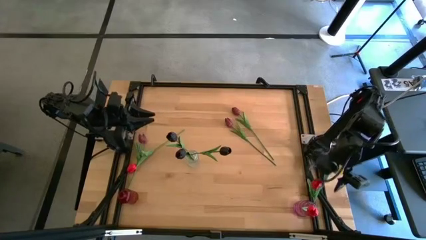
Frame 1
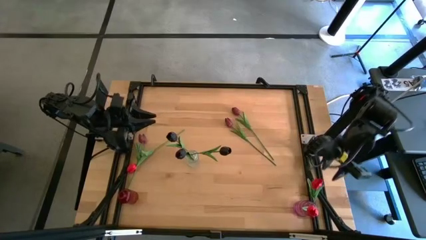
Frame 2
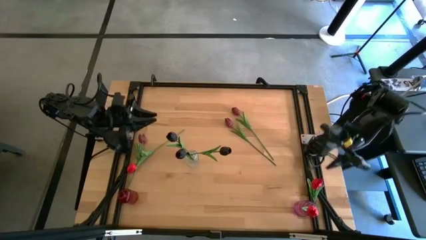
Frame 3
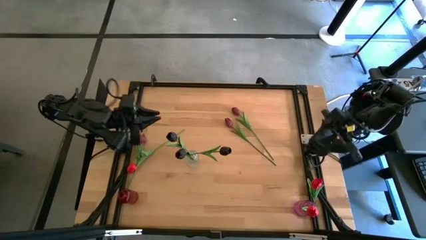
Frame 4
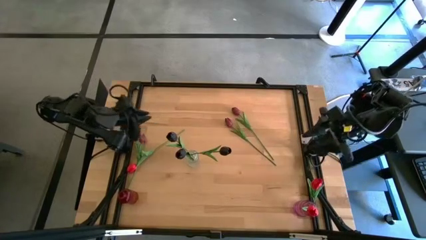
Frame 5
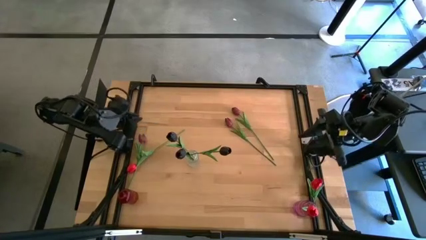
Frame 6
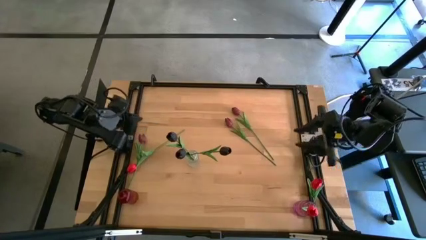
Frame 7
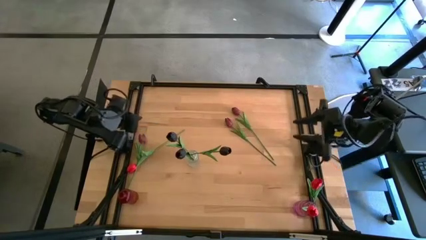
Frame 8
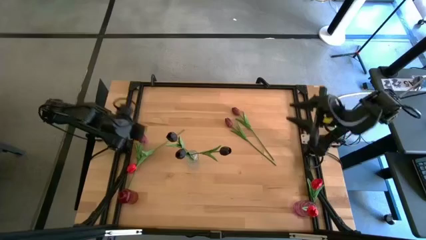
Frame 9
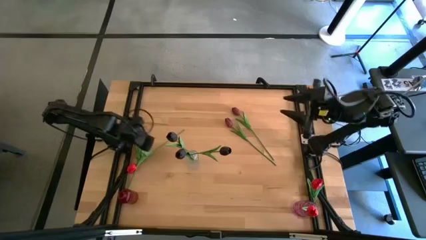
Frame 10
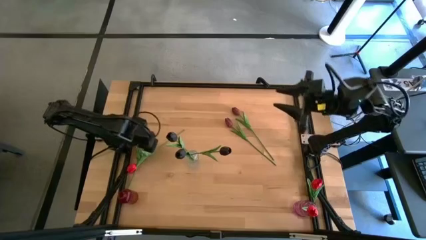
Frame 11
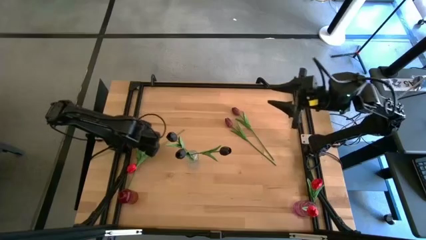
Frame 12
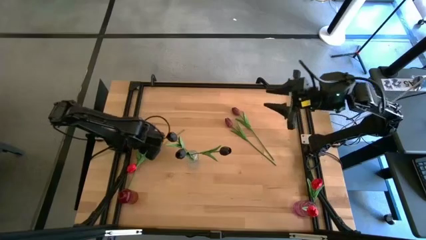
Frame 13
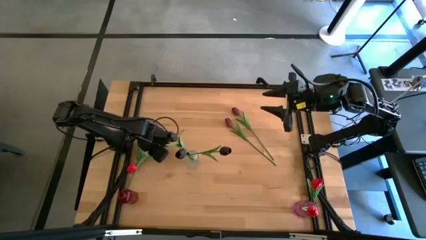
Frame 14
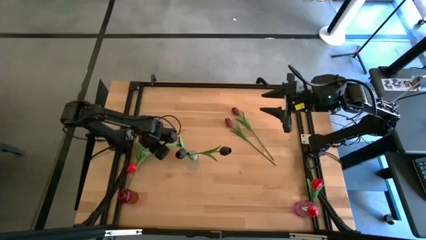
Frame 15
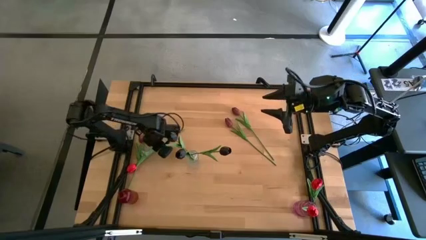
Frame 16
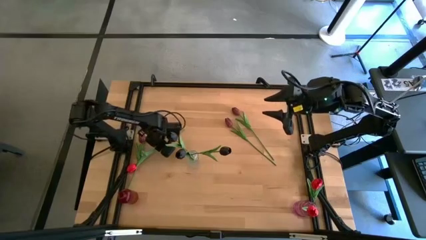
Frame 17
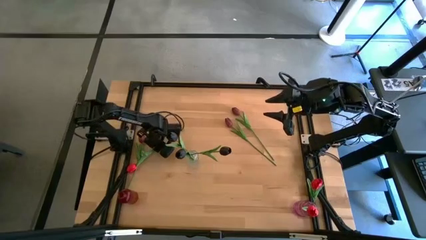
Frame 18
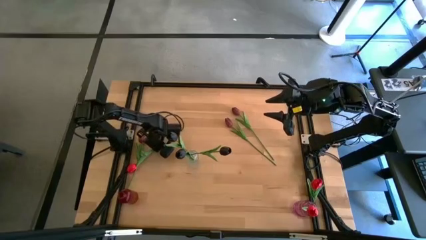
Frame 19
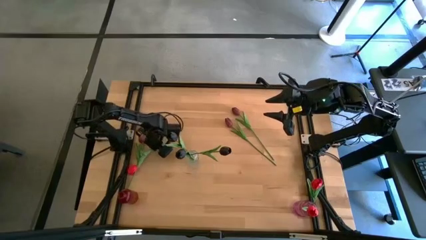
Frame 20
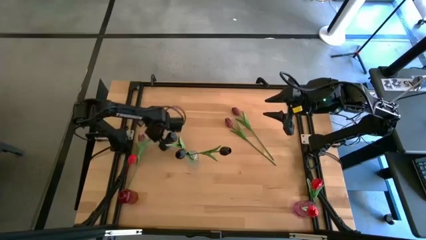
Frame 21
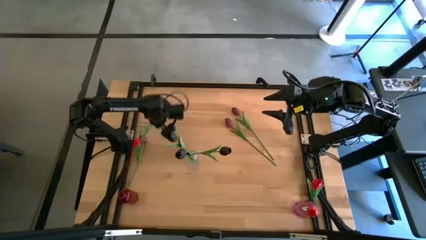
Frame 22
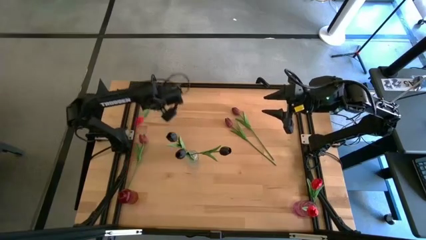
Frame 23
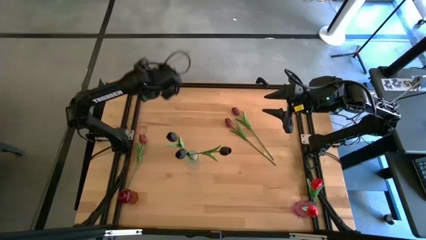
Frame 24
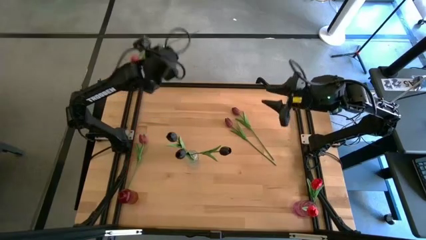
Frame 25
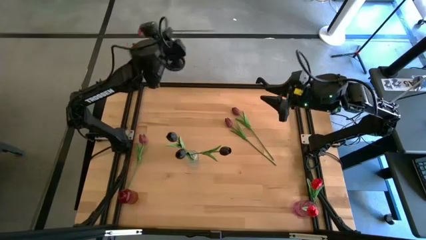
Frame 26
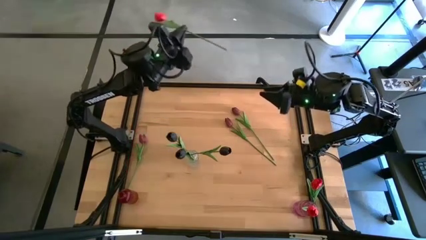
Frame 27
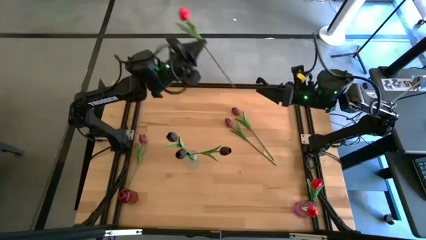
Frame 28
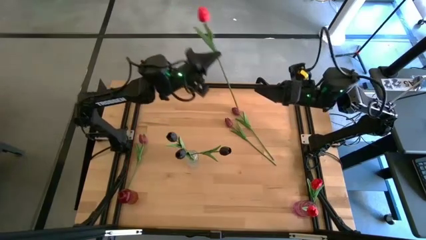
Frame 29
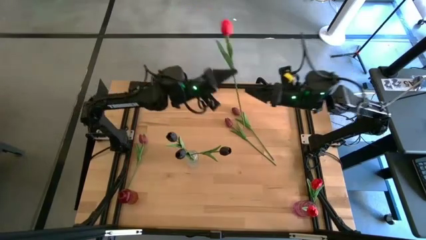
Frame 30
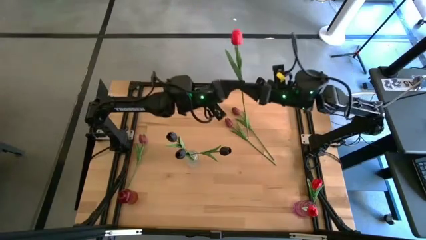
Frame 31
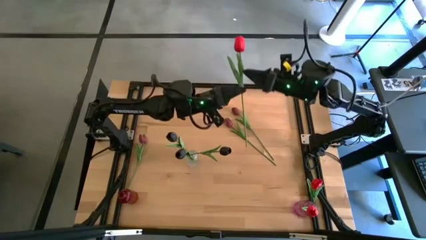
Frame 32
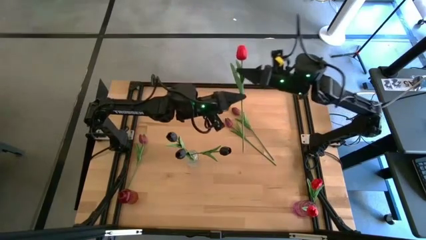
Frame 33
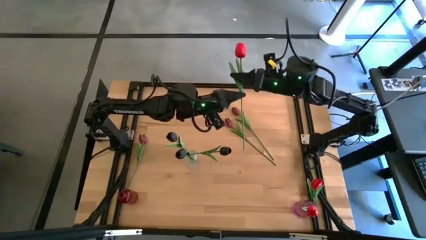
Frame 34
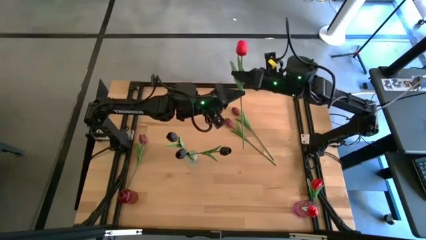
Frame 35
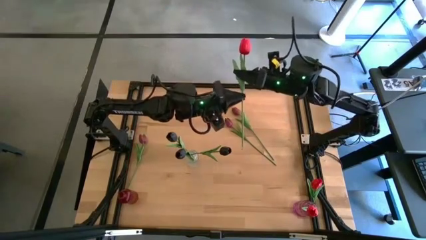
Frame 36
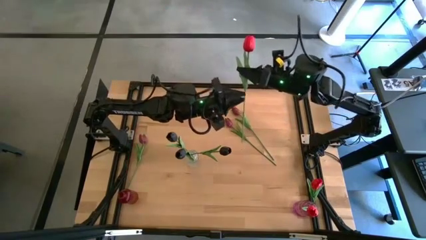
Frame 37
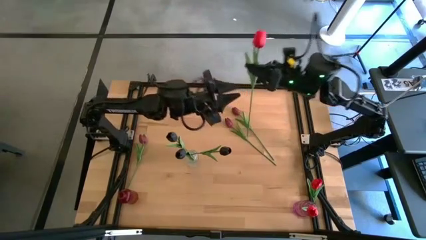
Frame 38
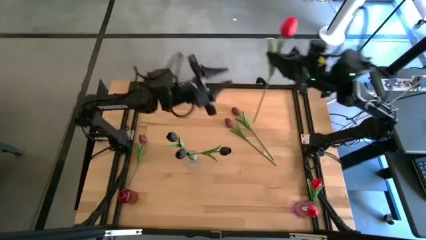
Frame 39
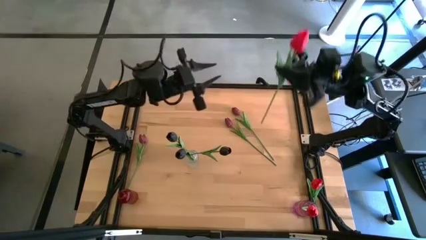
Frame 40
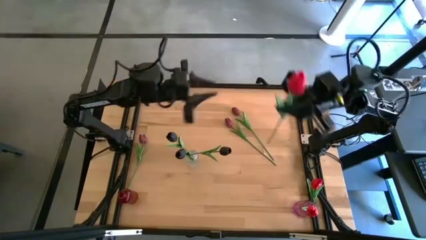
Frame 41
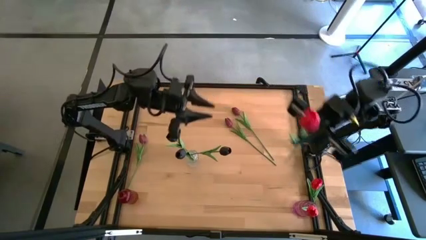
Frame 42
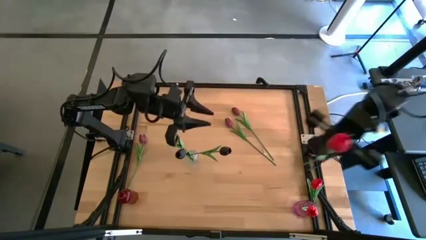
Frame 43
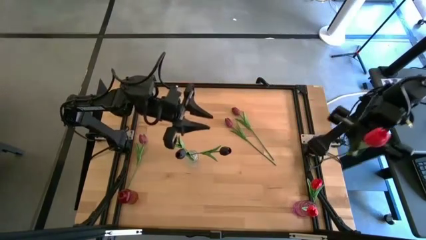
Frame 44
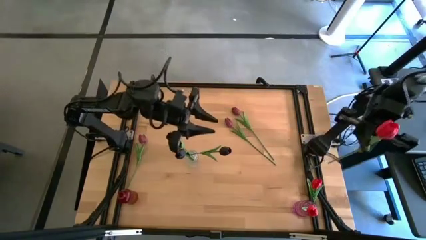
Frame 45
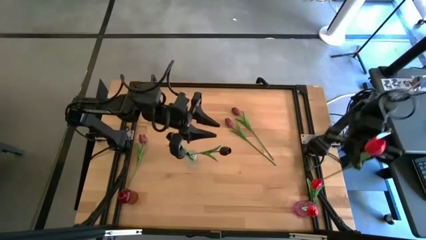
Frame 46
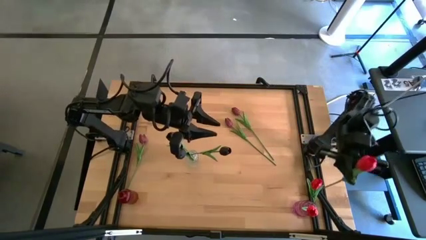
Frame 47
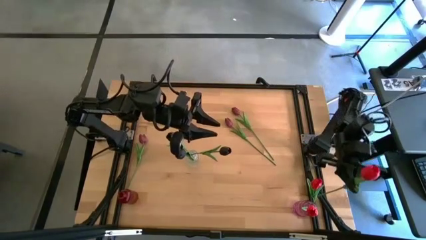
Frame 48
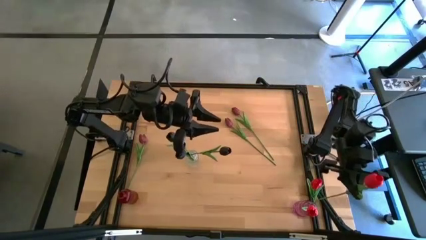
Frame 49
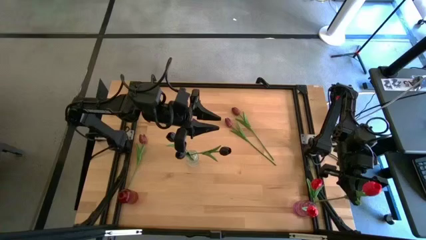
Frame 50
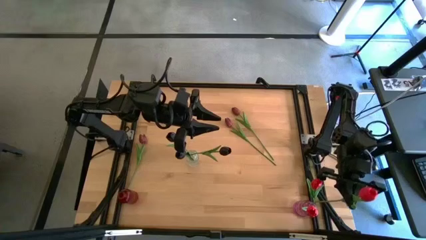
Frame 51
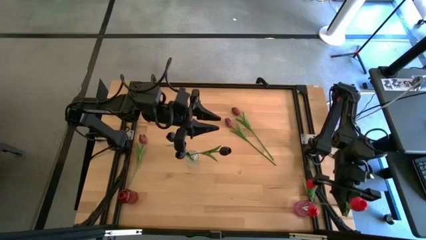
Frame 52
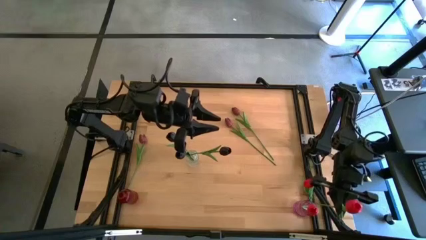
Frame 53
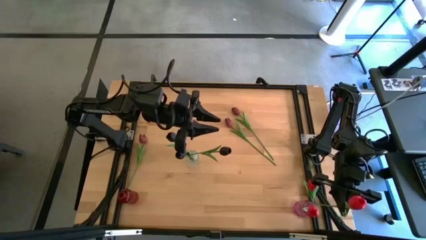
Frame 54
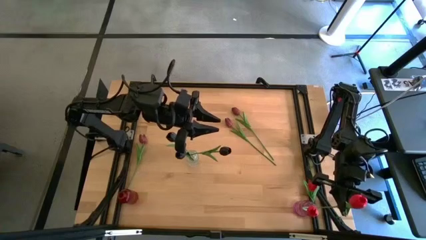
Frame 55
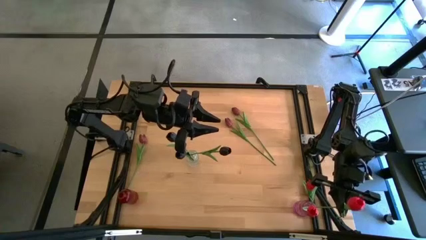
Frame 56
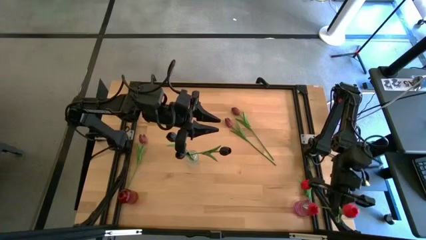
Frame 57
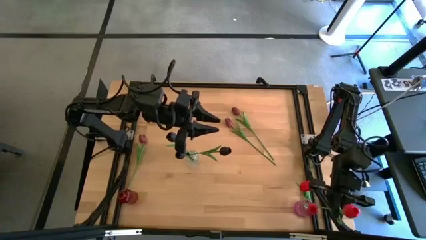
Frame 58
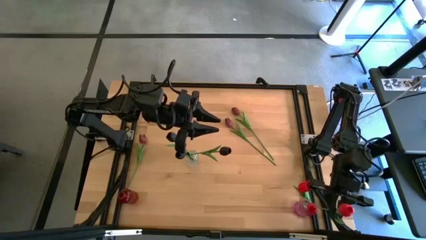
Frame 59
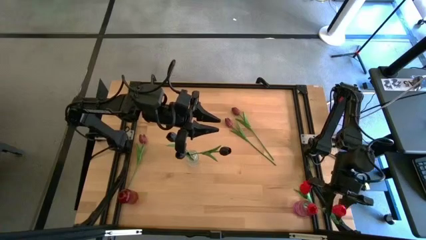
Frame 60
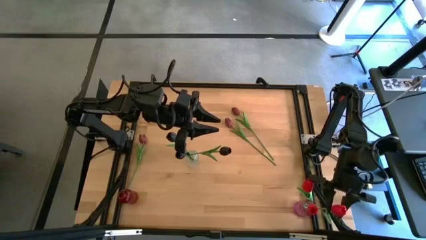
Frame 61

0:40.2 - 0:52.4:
Task: Sort flowers into vase by color
Put the red flower into the violet transparent vase
